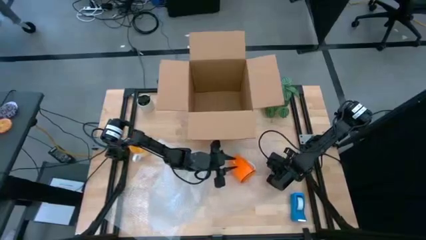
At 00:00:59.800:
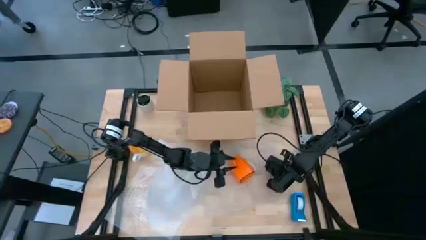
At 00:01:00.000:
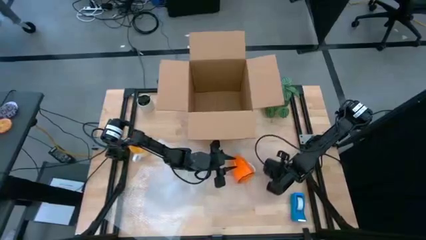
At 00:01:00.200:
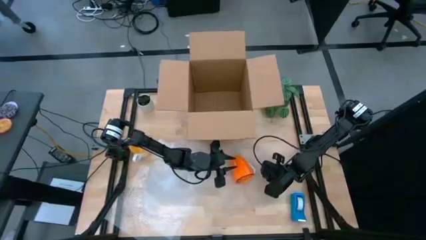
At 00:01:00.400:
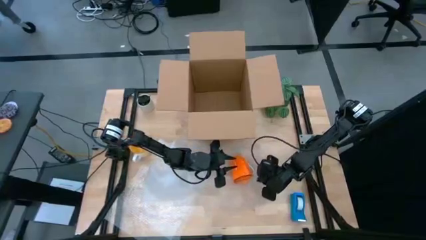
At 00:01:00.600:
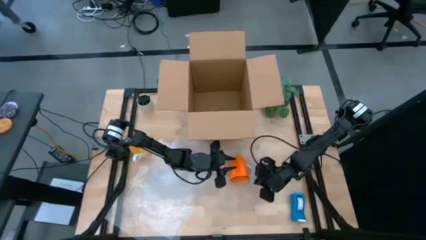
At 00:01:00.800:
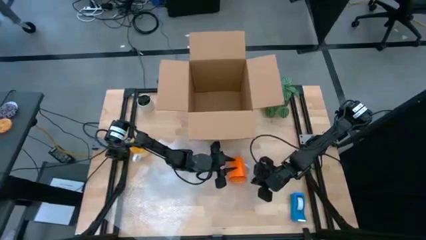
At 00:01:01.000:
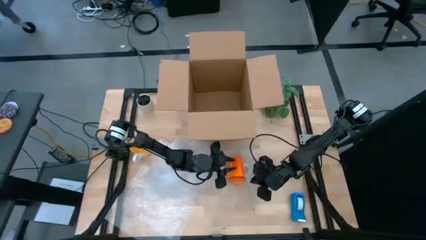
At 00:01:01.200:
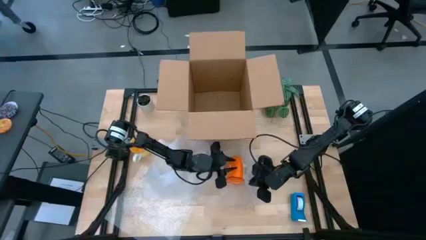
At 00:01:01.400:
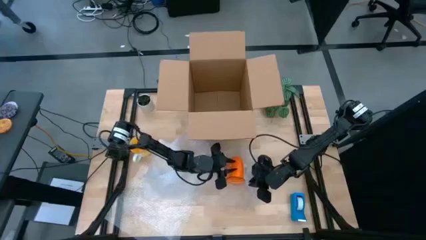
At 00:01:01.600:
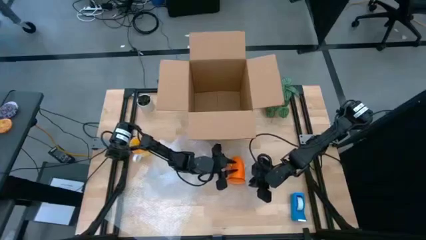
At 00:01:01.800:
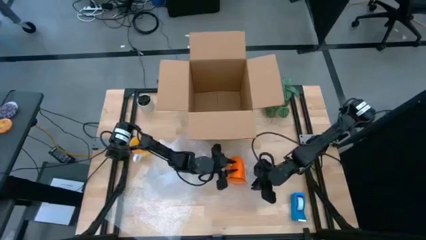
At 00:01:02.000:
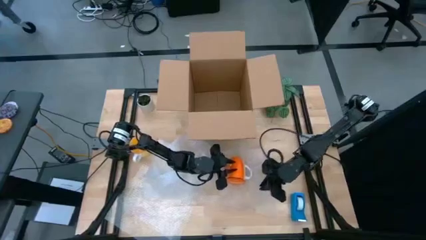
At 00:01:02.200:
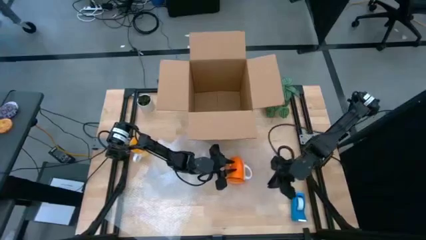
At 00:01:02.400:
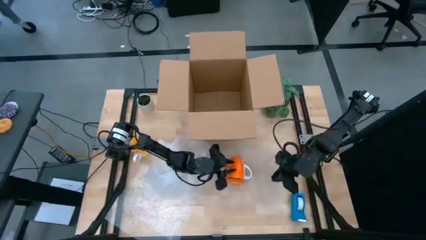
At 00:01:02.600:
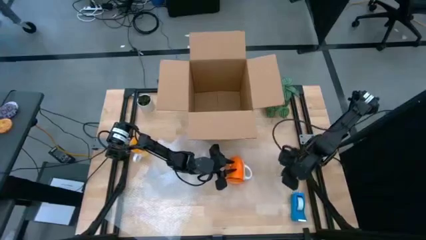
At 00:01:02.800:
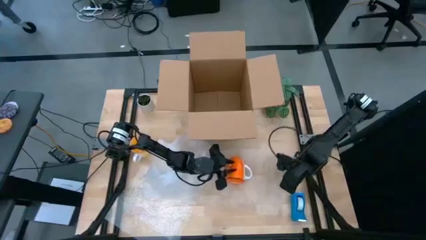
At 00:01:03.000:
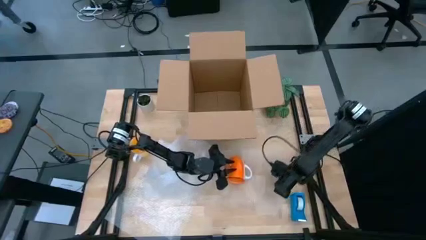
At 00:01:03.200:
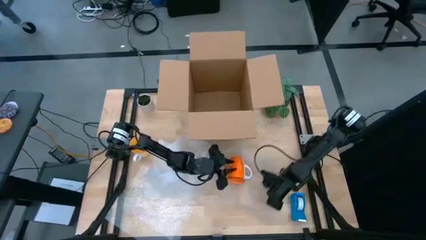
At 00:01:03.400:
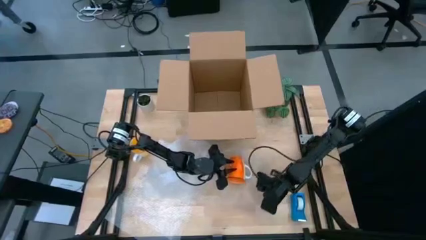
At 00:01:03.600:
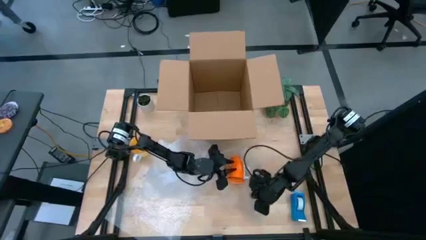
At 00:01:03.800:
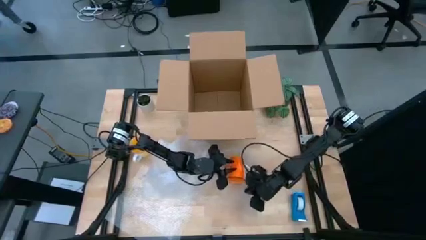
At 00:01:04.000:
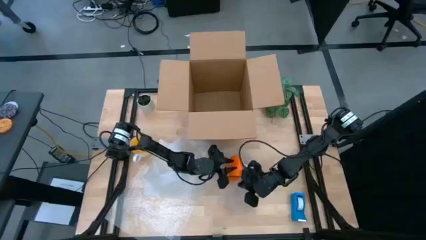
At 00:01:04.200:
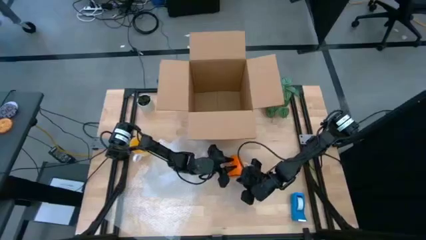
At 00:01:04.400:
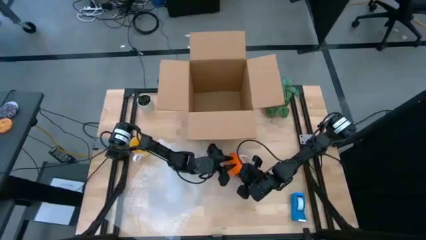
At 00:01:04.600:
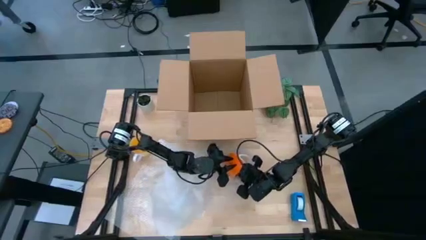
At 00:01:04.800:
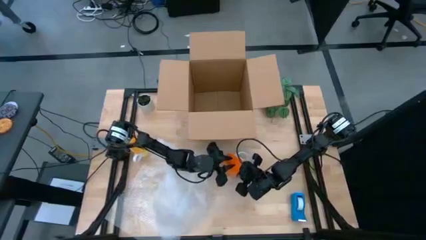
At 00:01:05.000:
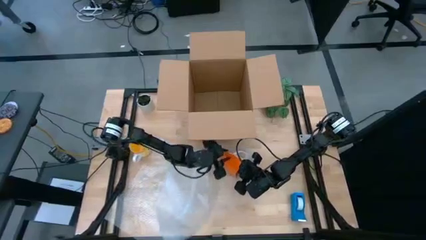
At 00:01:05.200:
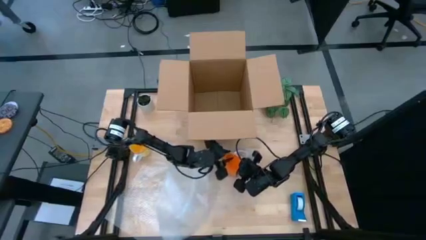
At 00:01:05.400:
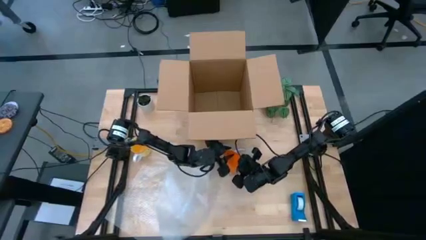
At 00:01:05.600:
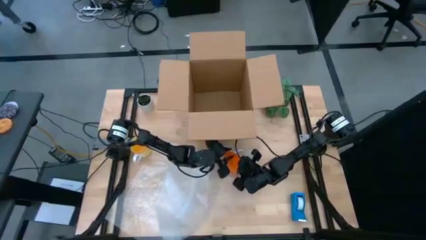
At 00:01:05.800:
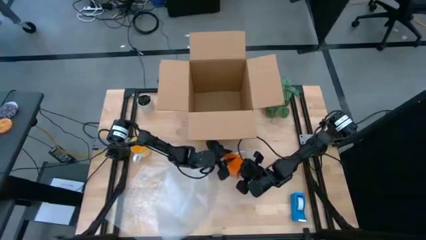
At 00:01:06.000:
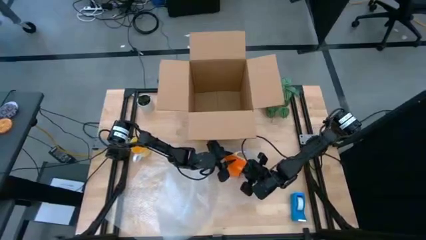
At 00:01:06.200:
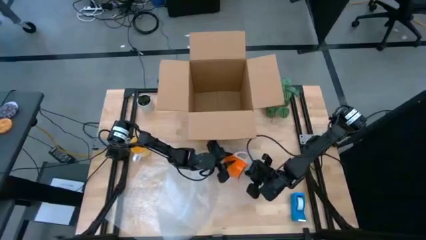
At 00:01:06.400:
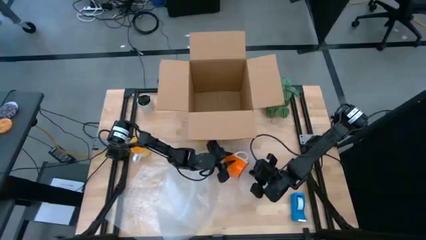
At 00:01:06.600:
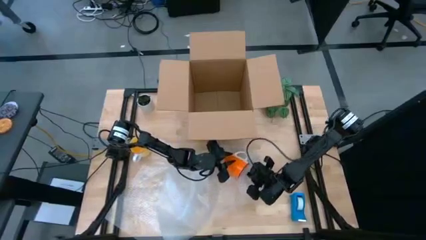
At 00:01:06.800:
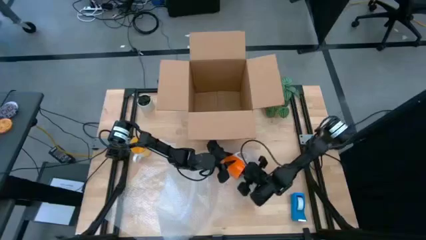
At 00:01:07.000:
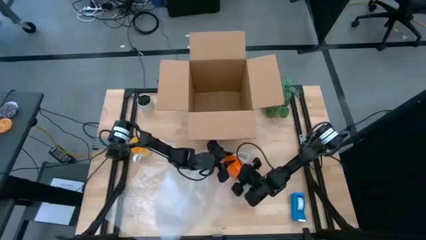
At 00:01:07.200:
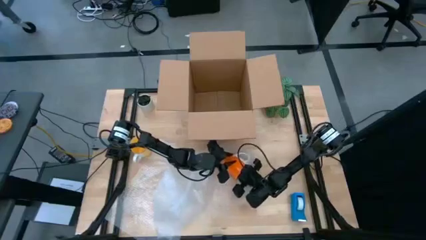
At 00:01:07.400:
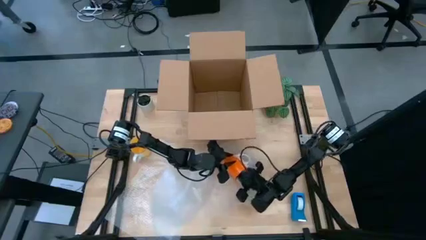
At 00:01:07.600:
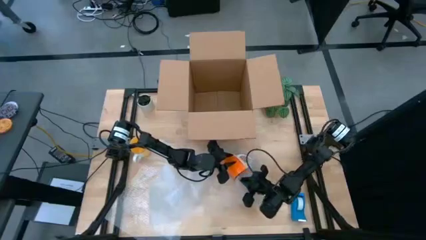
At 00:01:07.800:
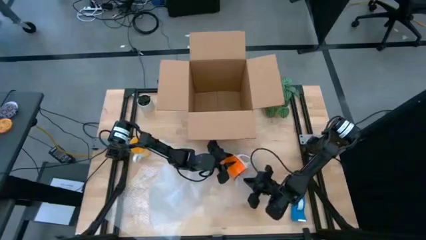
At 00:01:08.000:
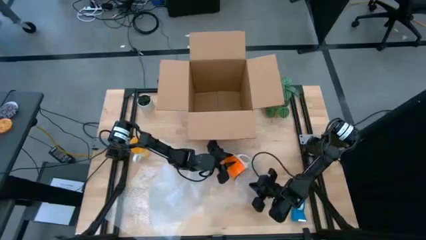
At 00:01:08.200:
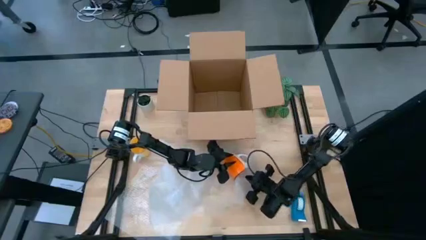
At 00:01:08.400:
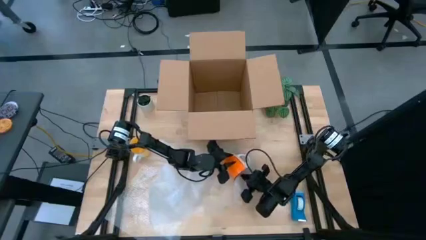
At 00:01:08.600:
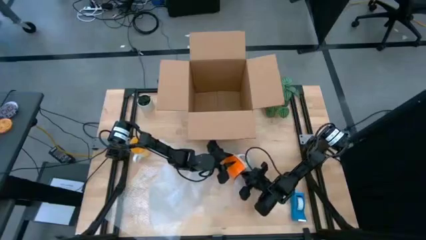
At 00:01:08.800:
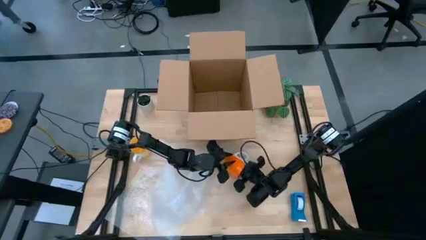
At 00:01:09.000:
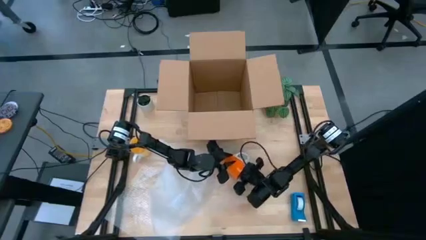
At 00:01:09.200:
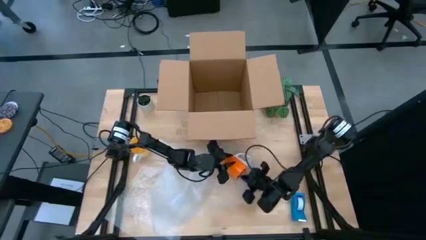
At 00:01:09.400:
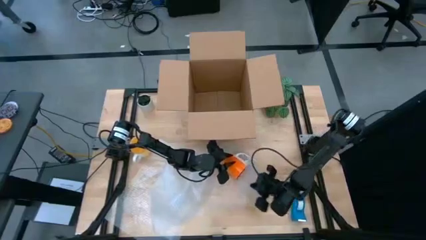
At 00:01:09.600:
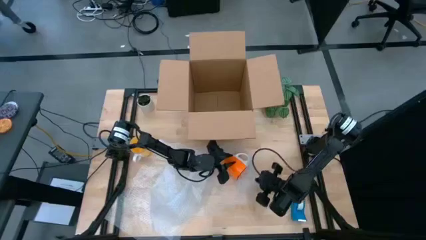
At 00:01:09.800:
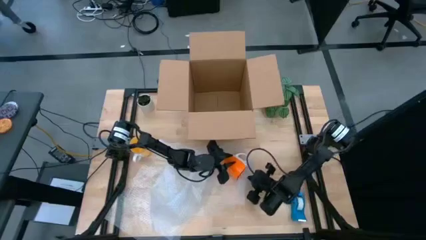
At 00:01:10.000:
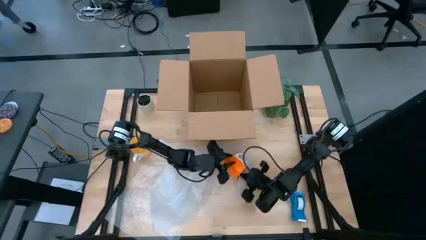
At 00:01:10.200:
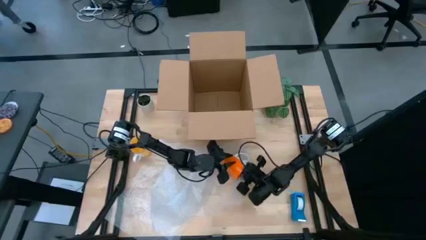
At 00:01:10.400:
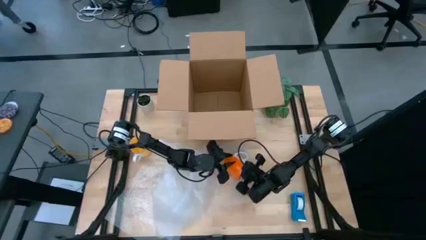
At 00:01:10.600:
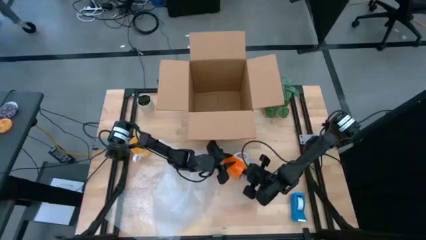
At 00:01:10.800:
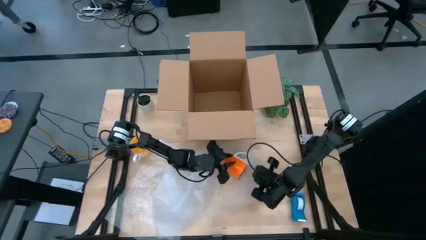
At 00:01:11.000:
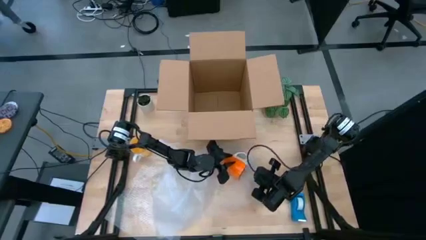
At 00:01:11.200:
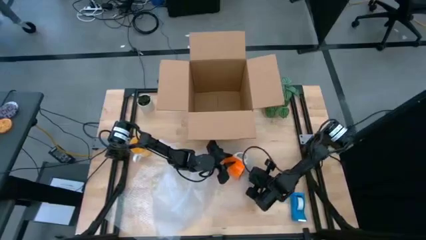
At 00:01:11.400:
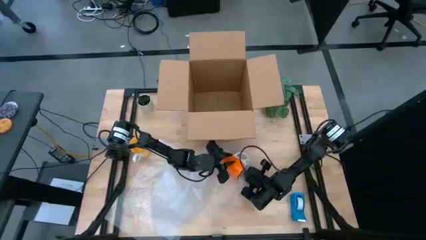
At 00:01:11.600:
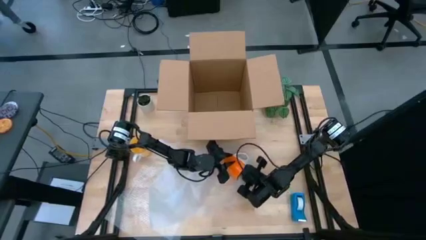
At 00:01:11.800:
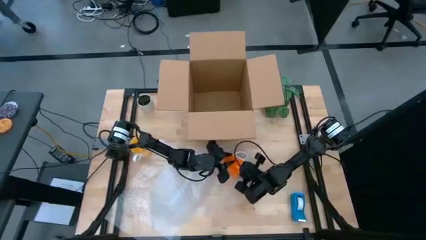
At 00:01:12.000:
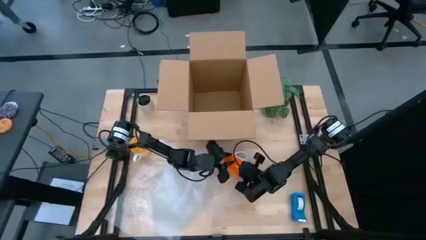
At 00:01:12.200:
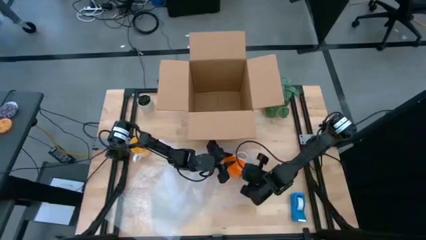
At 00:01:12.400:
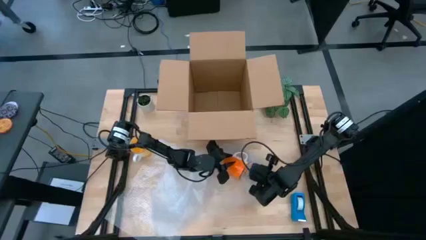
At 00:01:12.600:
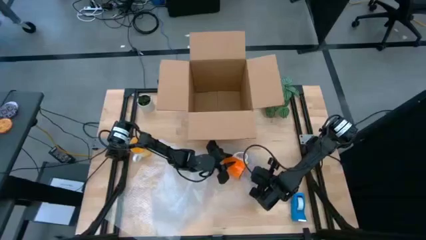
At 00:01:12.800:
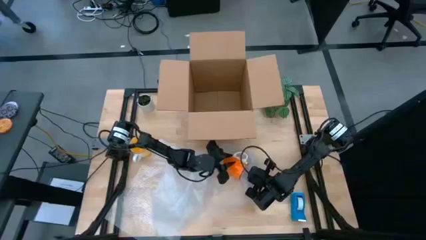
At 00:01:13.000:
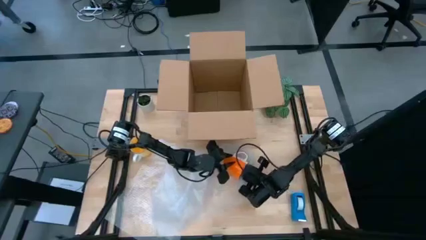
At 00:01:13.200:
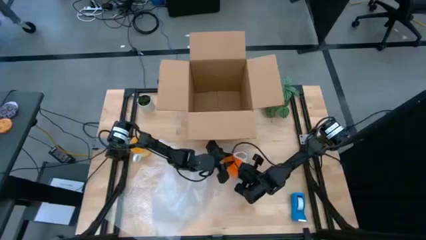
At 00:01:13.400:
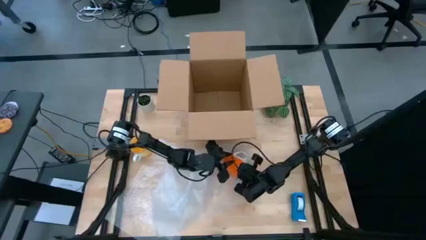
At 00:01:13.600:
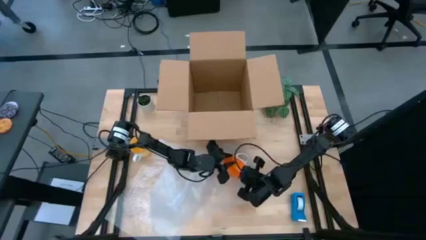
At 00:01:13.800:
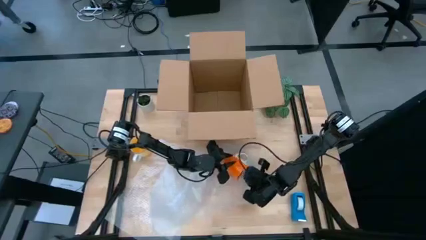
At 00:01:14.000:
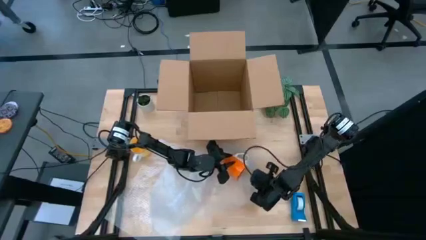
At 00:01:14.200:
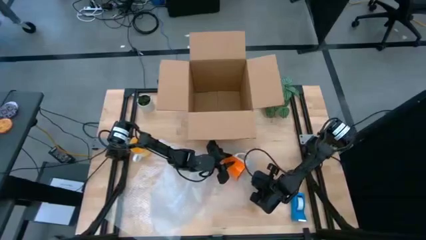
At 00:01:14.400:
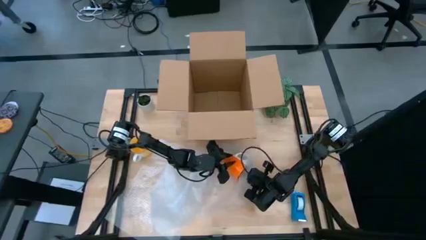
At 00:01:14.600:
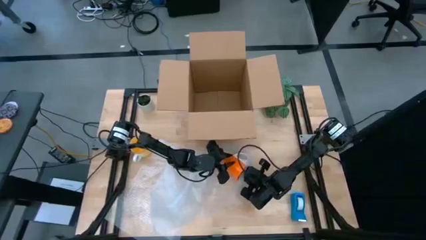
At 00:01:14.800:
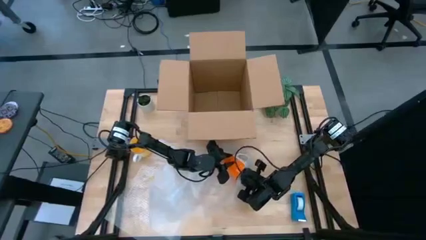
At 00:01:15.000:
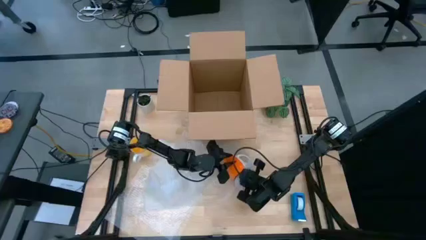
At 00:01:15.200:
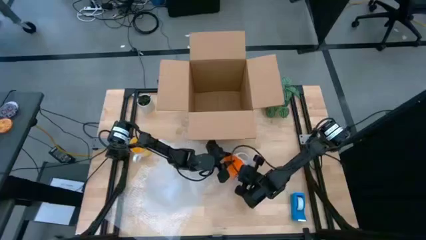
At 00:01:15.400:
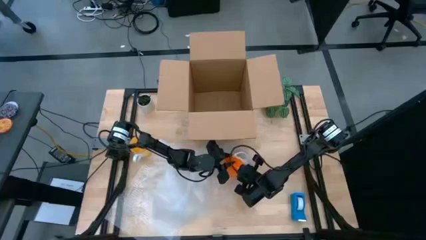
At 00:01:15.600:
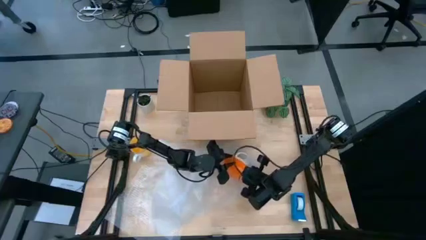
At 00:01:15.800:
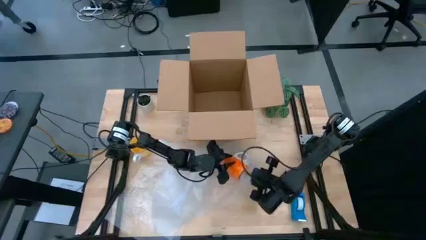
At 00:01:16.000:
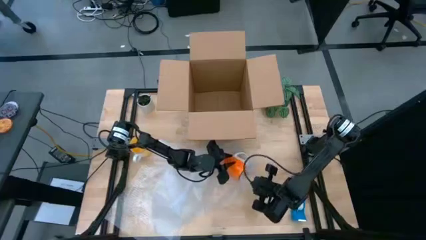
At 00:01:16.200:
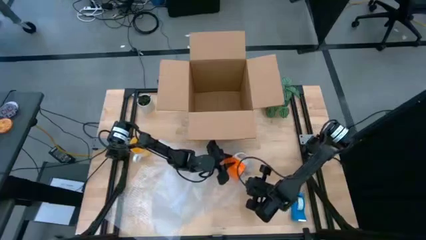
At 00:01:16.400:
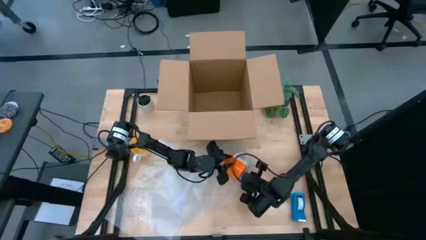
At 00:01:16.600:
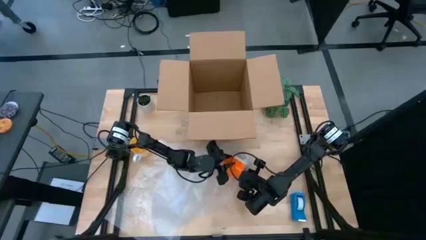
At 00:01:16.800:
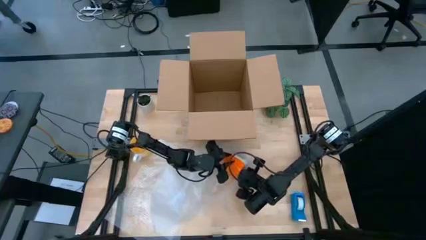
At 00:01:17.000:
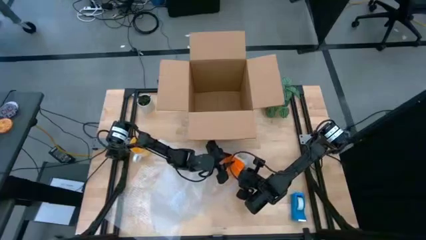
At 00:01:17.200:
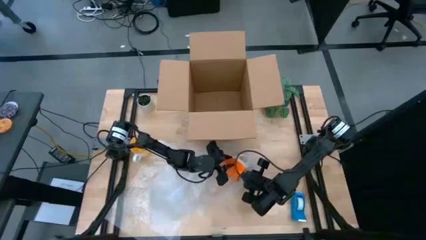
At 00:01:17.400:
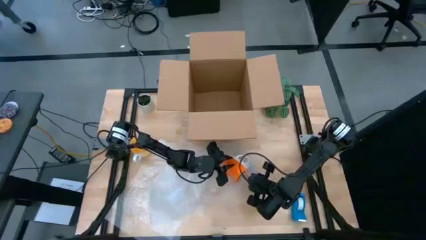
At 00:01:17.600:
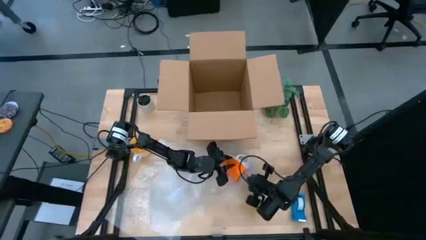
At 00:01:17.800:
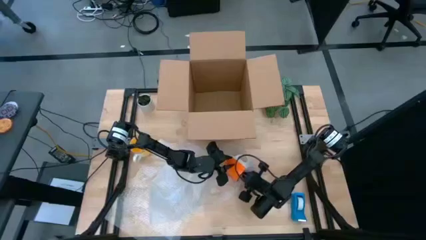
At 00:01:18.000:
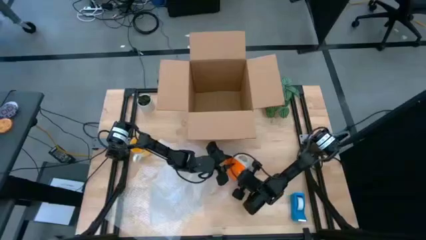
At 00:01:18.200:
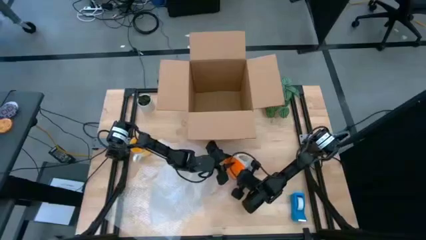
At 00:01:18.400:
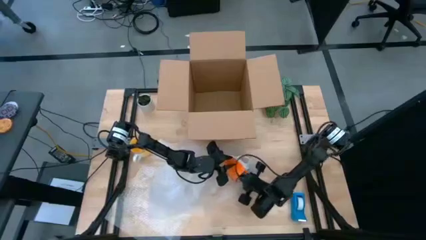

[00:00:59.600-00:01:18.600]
Task: wrap mug
Wrap the orange mug with the bubble wrap
